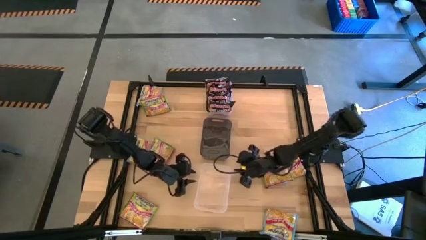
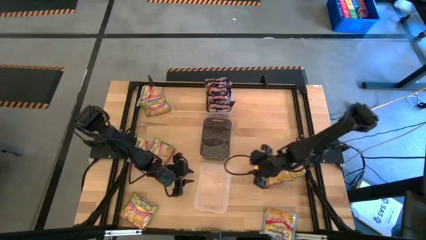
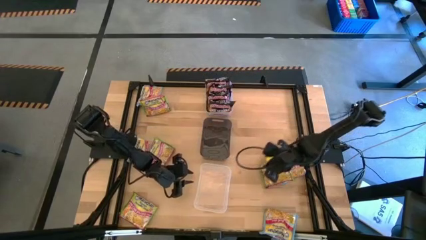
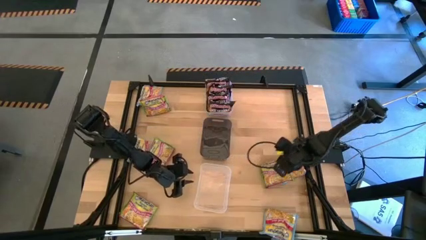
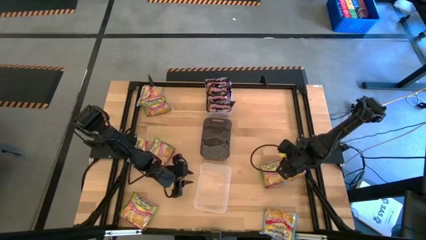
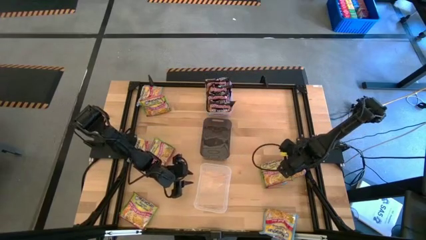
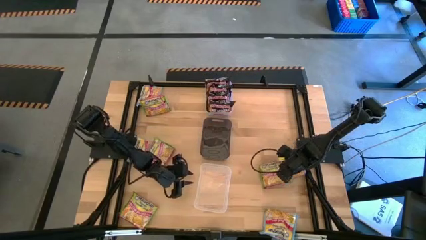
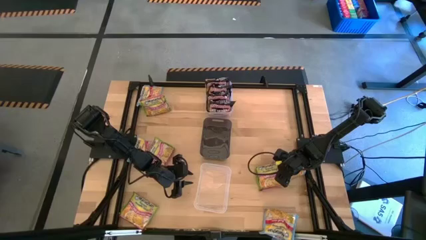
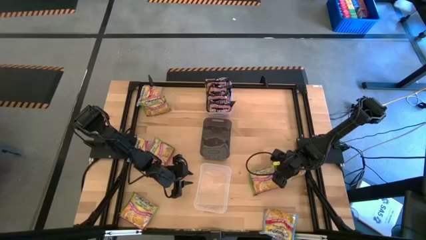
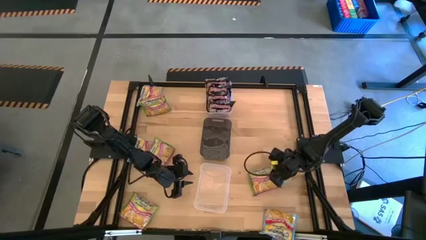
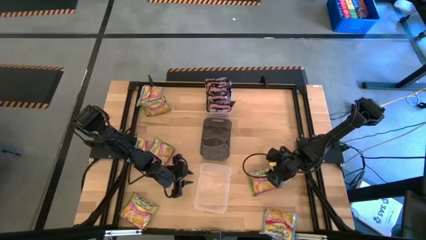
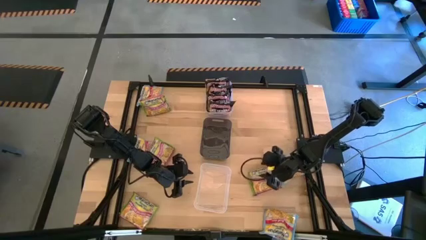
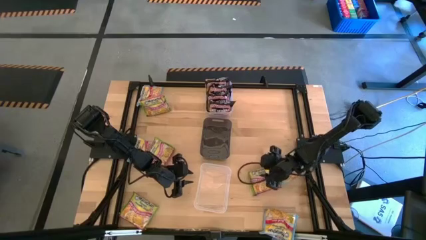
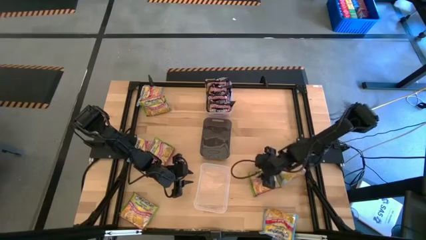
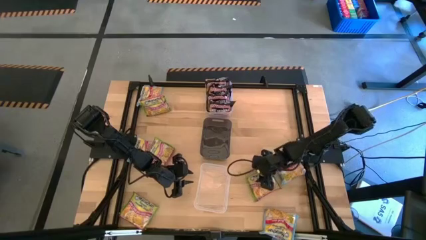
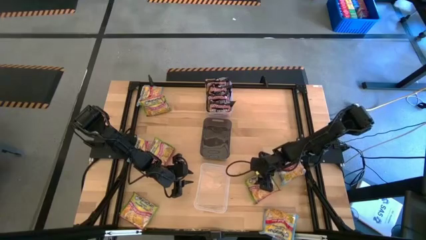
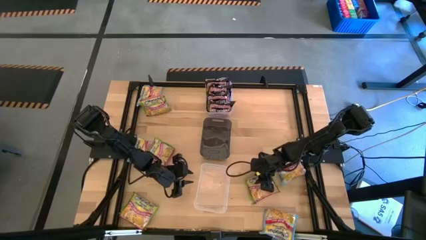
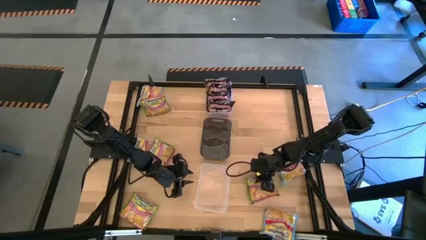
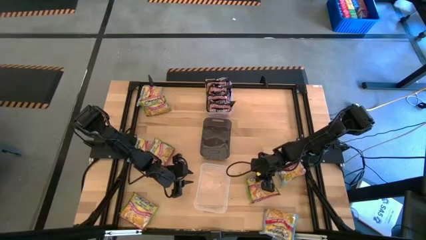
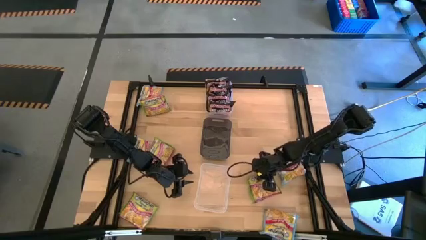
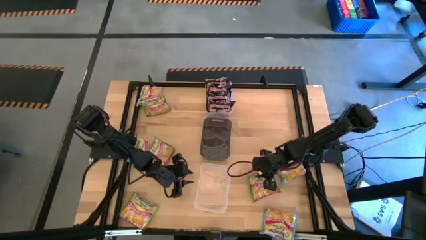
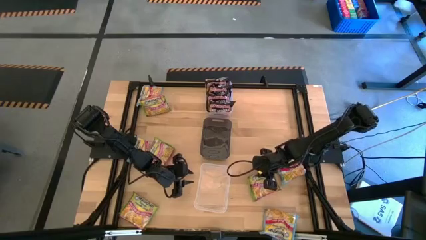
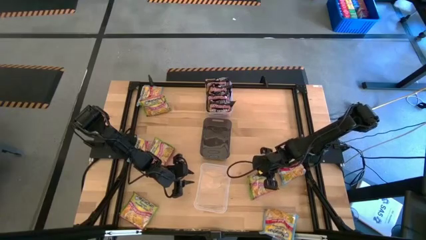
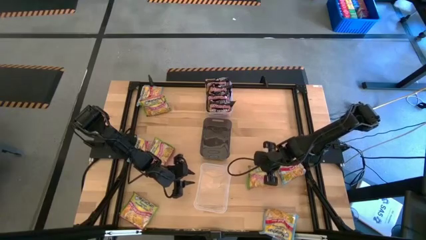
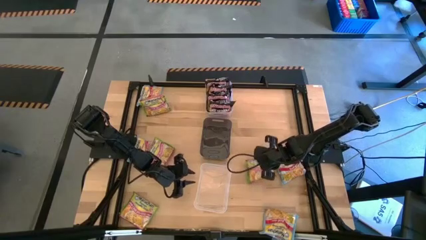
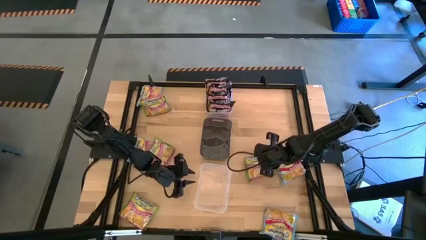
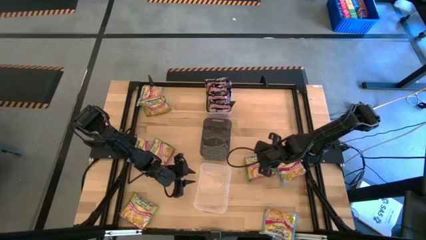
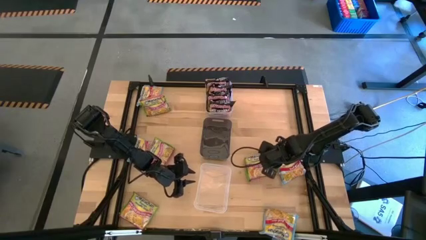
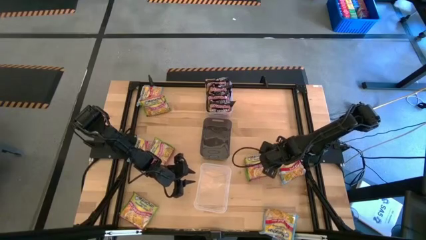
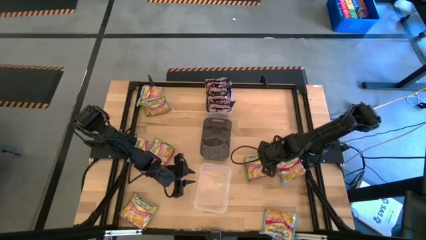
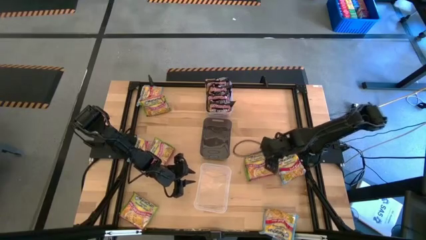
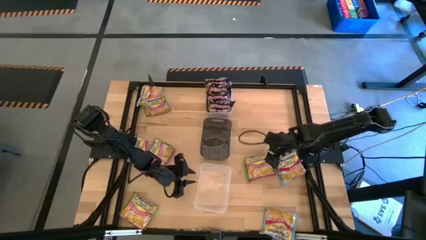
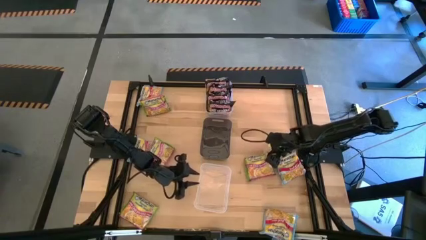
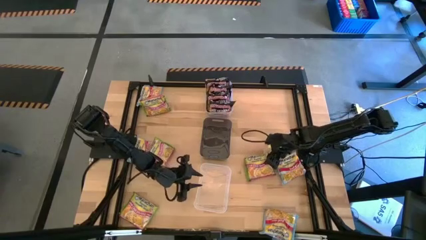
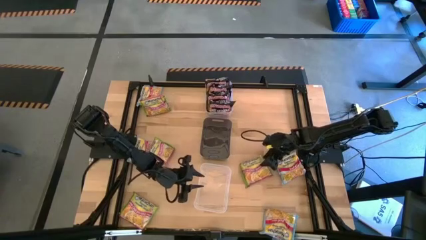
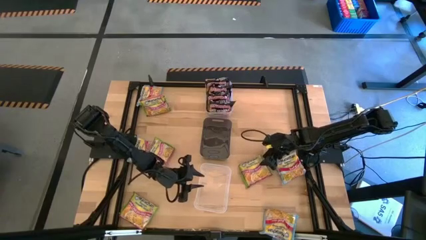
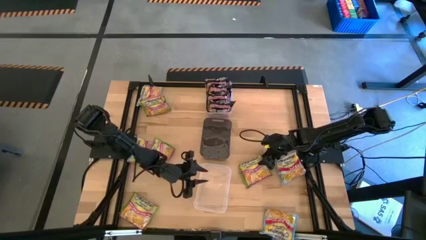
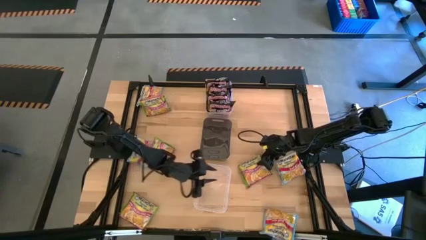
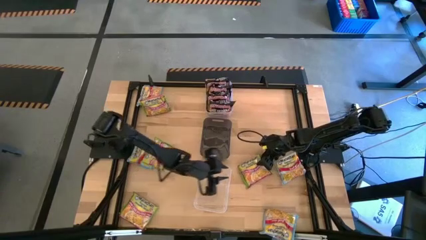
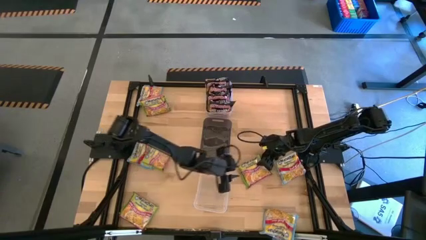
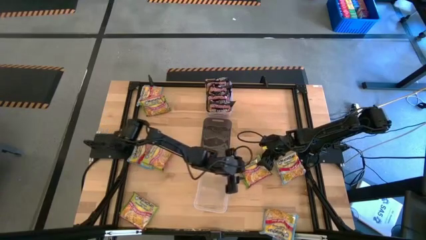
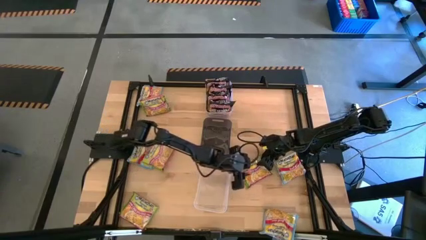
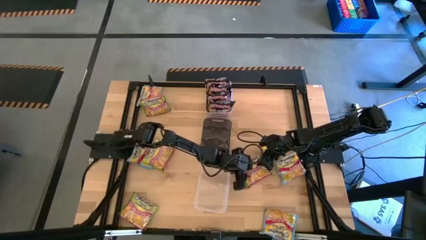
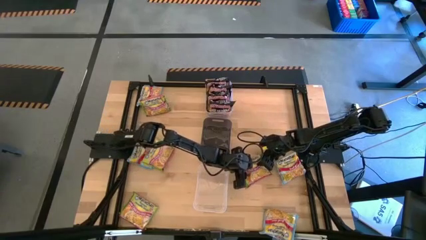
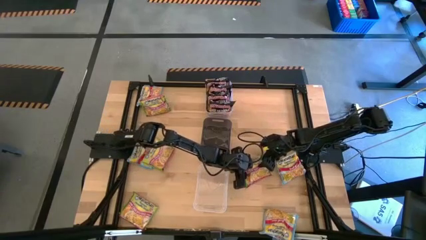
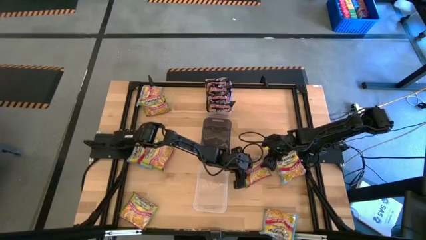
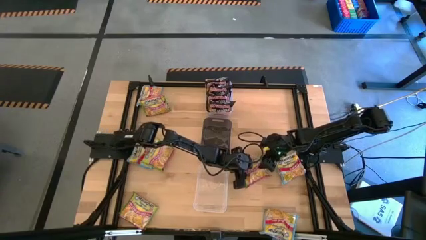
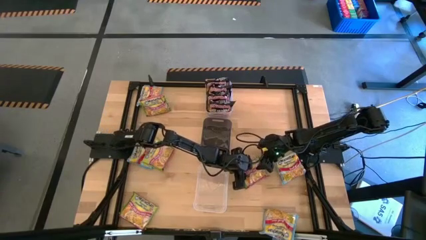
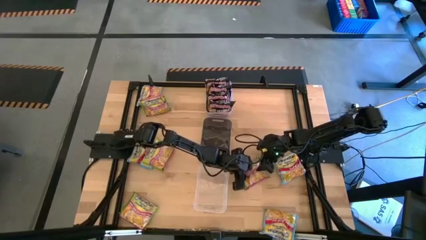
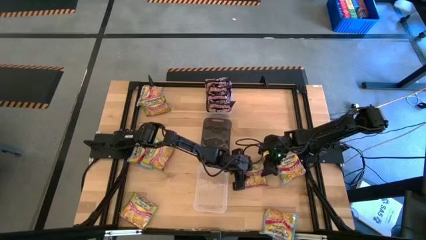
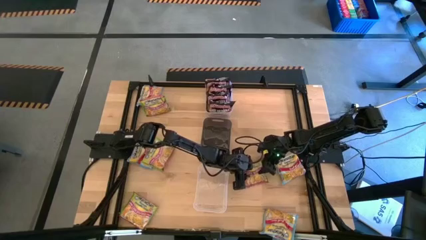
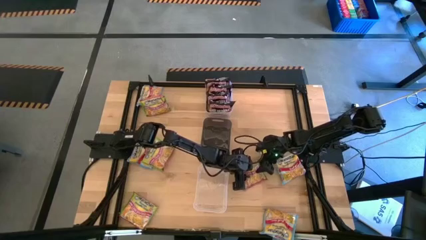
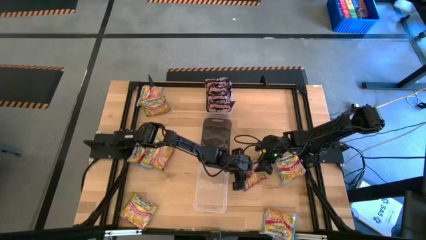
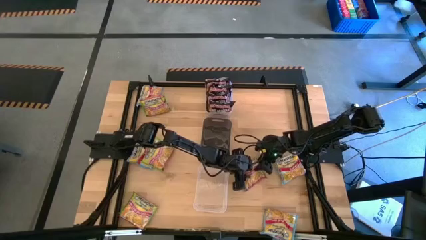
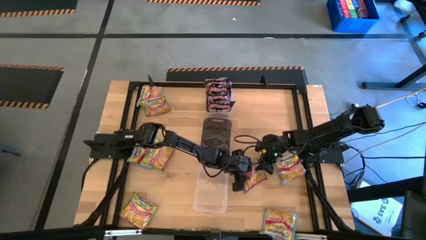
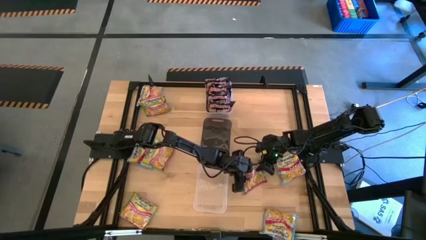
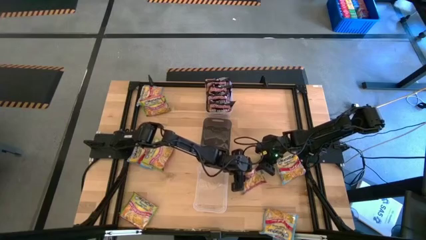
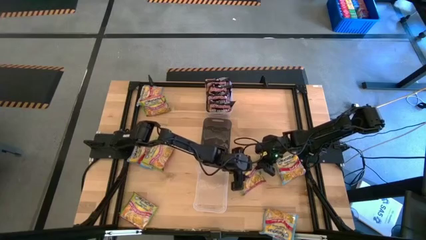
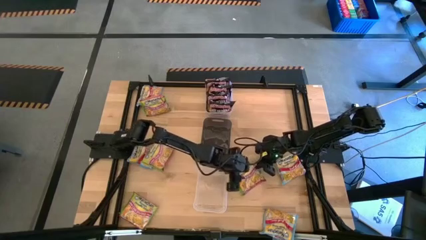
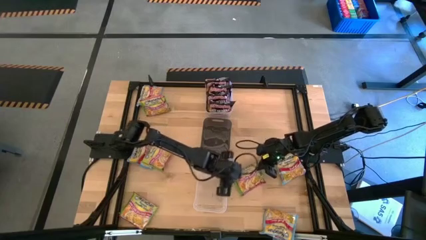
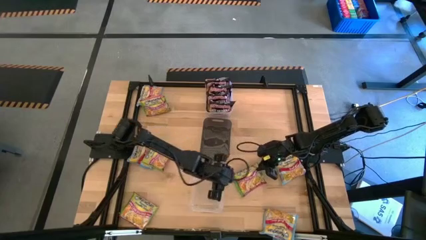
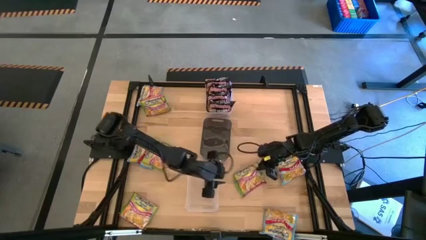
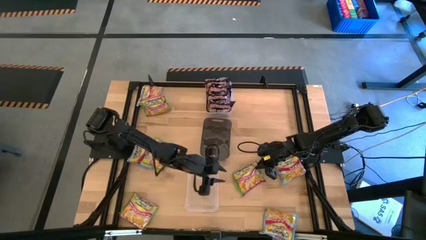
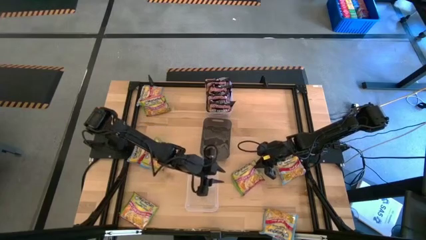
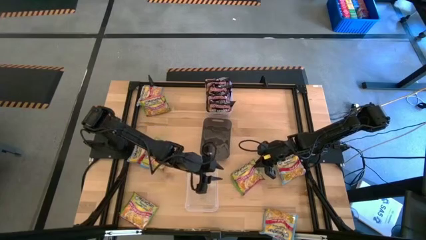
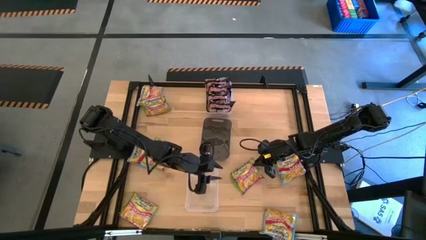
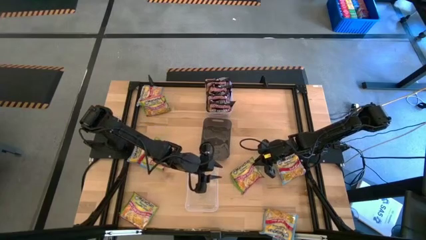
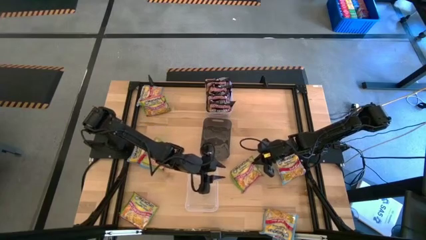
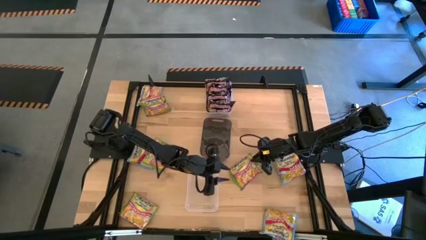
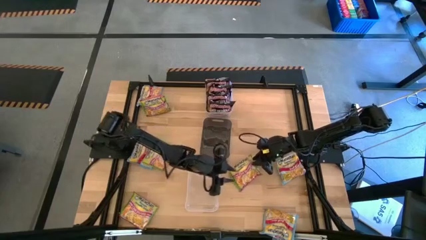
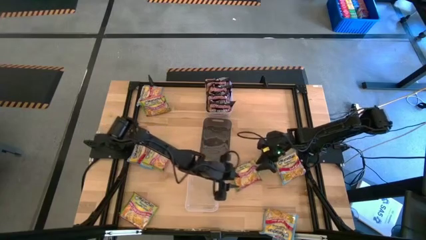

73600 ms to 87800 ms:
Task: Sort Maruchan noodles
Put the green noodle pack into the black bin

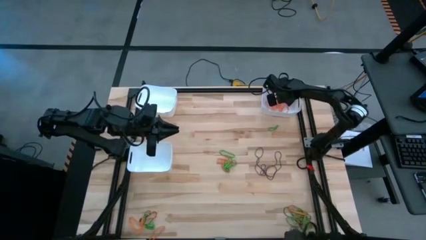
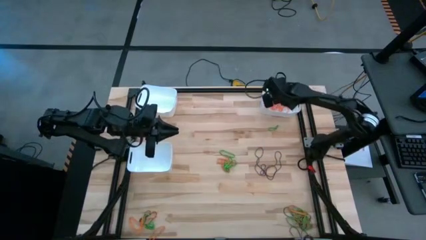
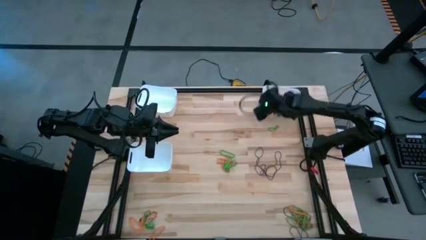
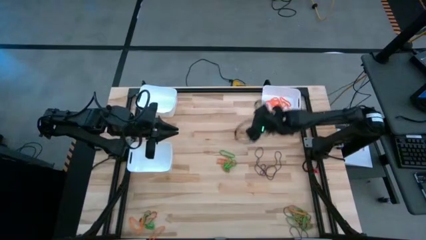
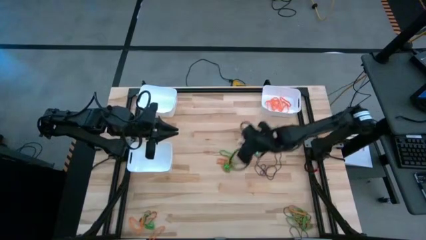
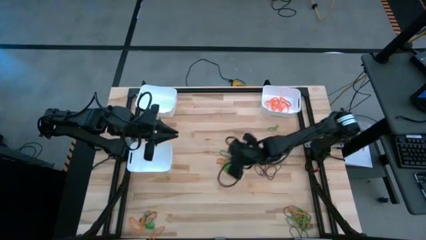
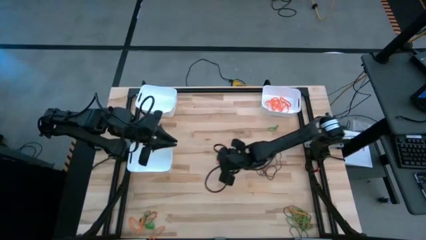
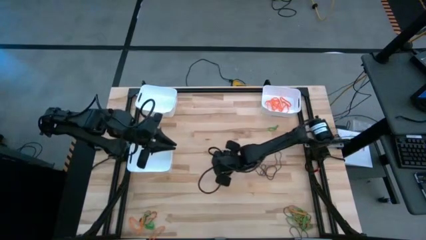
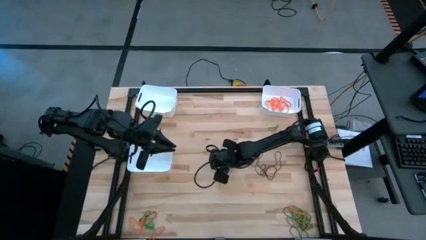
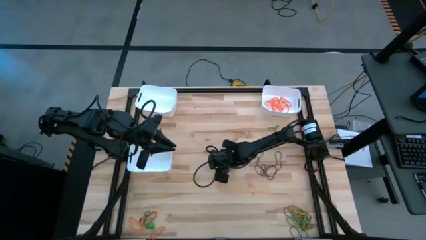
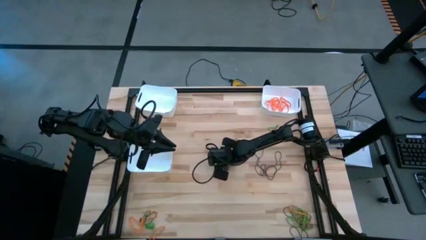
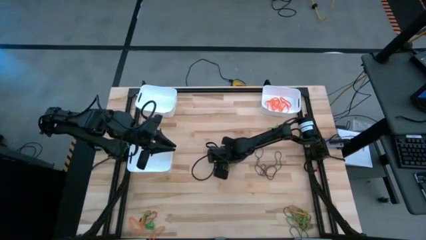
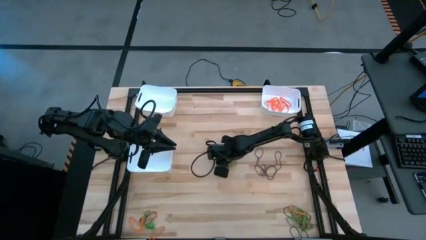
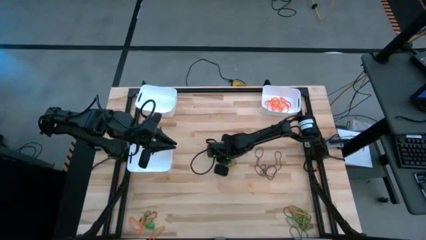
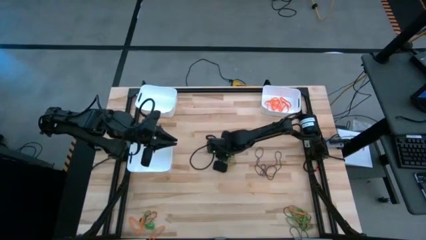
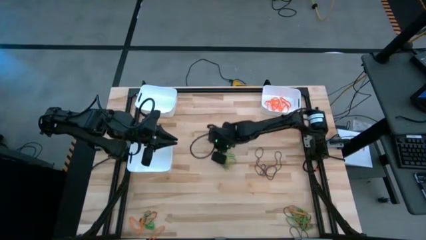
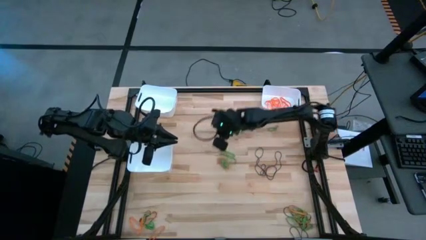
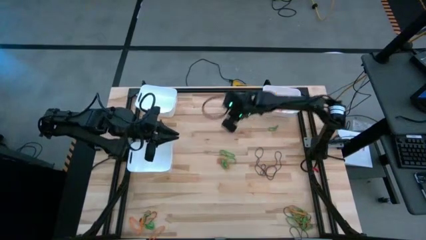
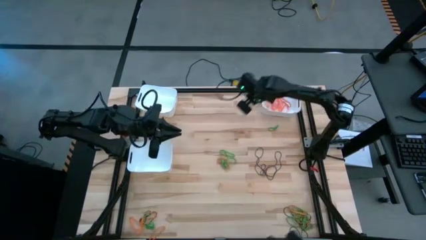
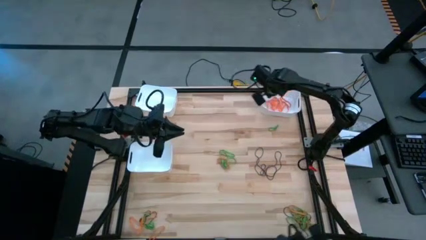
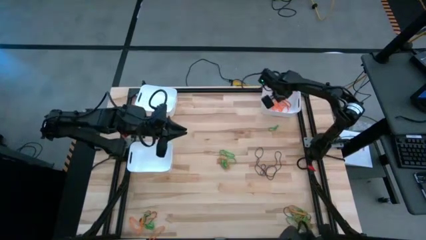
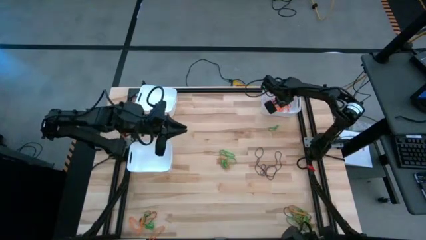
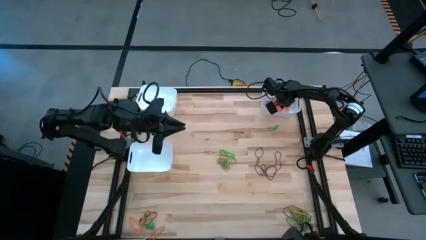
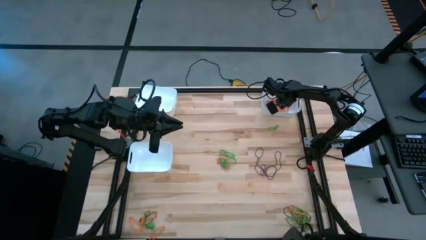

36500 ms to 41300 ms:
Task: Sort rubber bands into baskets
Put the orange rubber band into the top right white bin
